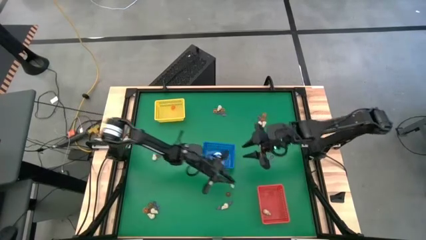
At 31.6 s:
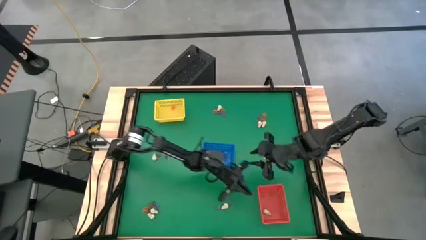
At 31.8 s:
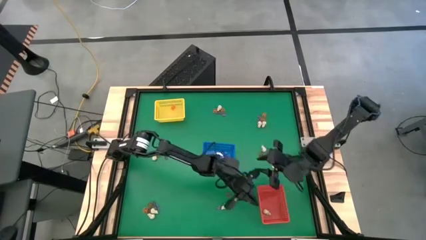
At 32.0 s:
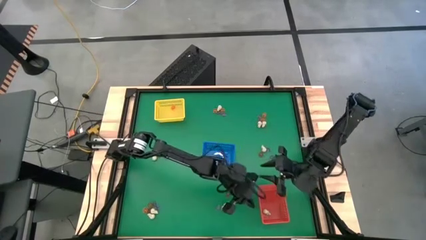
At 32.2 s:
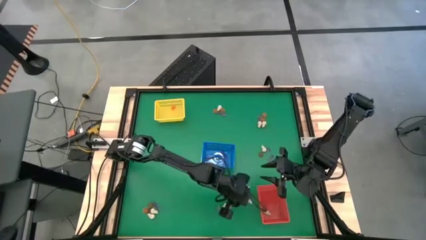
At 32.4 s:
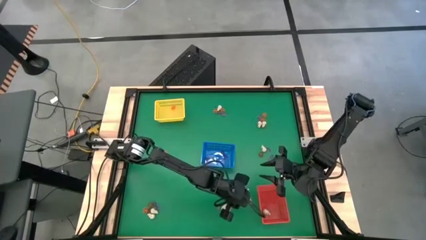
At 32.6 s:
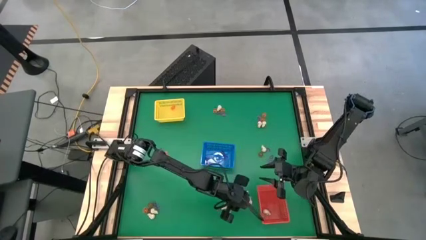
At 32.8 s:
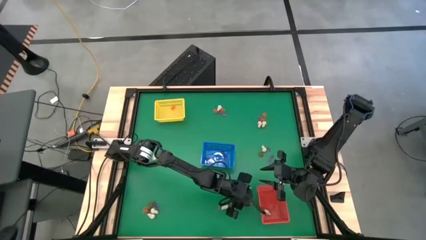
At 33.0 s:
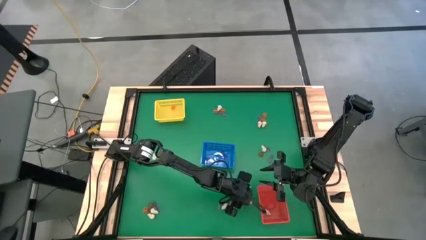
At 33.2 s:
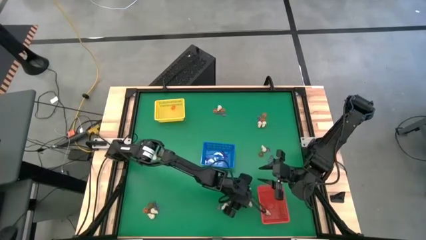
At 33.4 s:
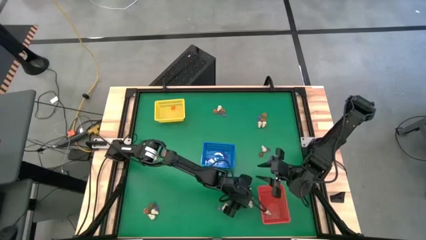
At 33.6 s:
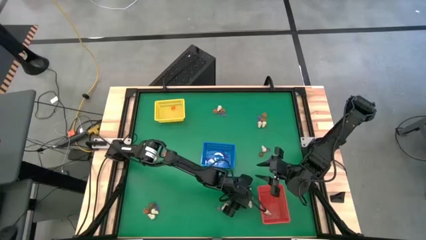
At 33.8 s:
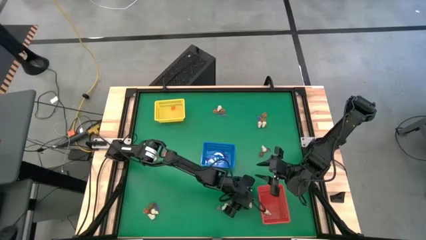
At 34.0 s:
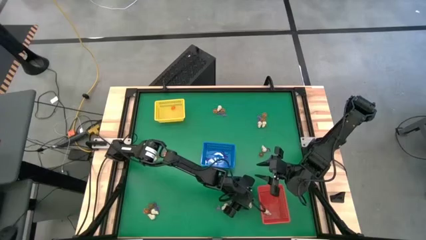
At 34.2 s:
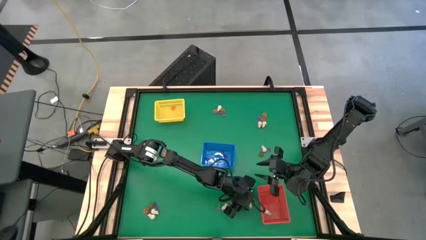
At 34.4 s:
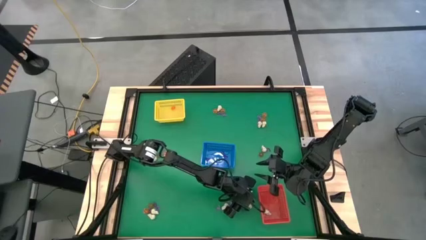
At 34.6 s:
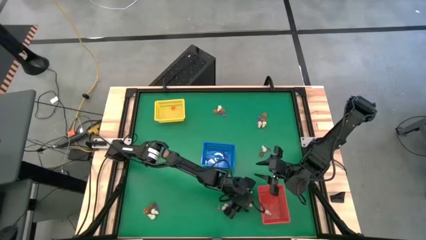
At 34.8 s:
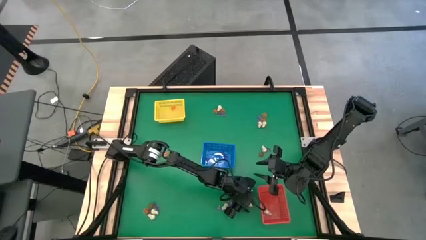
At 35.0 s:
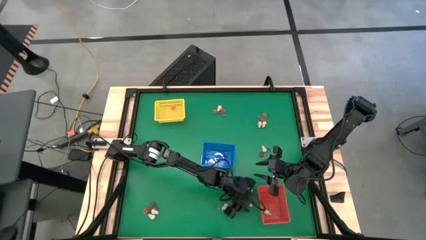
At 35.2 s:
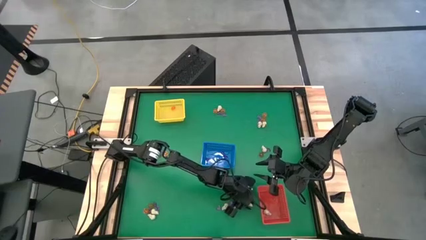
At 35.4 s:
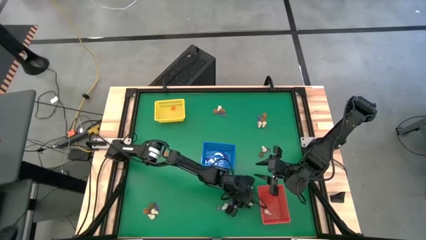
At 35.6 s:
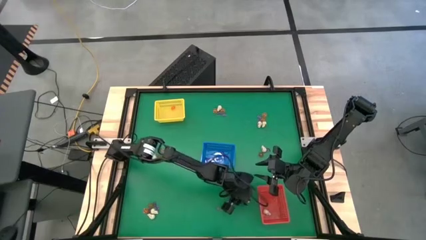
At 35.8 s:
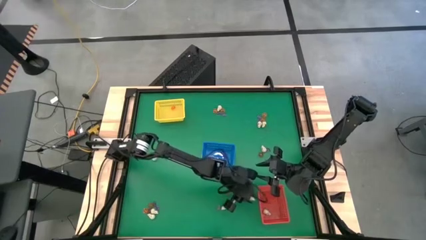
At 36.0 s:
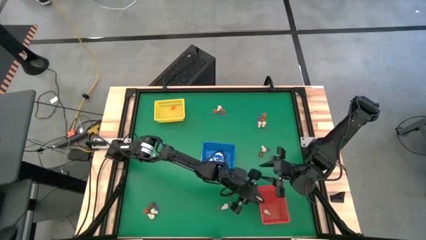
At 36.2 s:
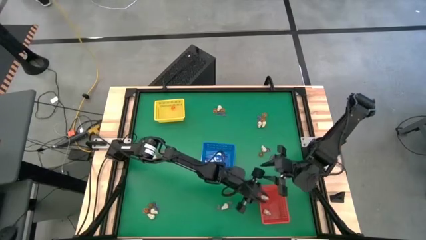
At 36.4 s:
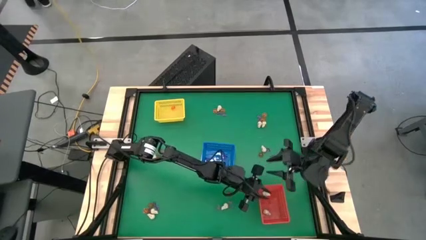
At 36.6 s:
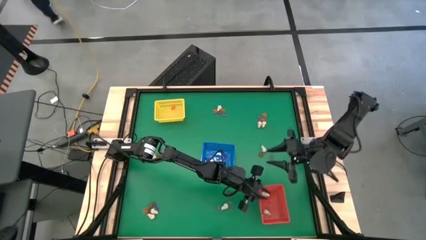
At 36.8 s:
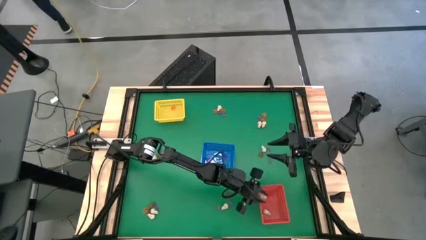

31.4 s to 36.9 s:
Task: Sort Halloween decoration
Put the skull toy into the red bin

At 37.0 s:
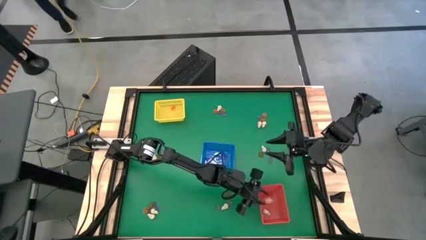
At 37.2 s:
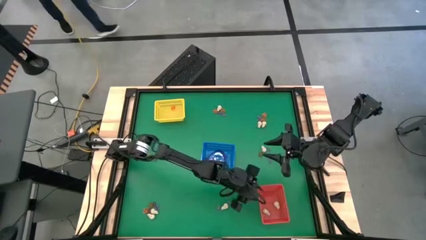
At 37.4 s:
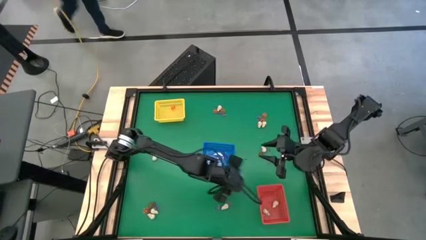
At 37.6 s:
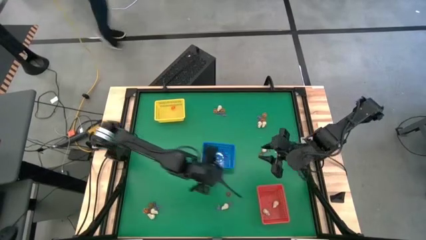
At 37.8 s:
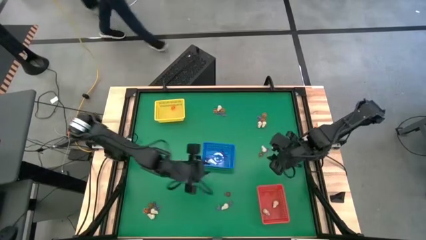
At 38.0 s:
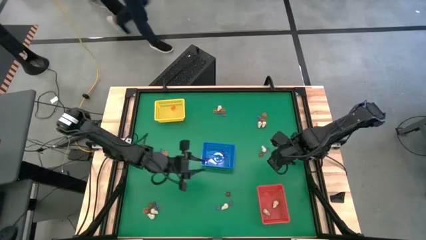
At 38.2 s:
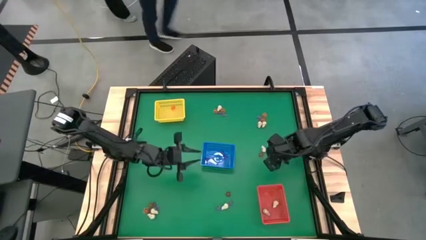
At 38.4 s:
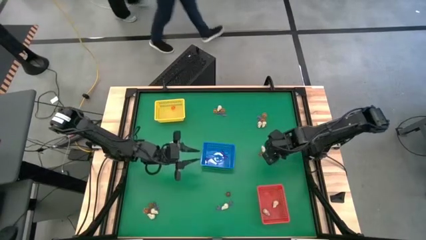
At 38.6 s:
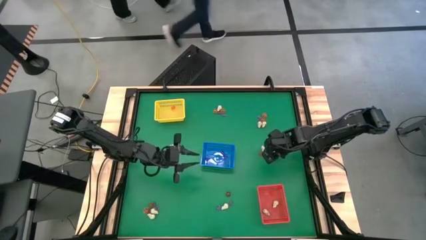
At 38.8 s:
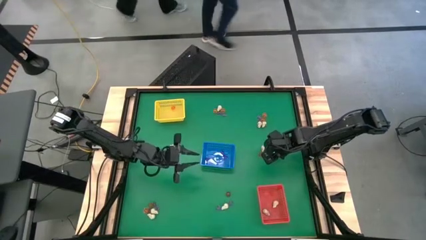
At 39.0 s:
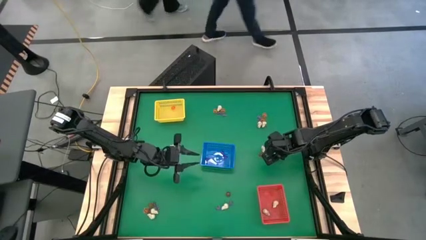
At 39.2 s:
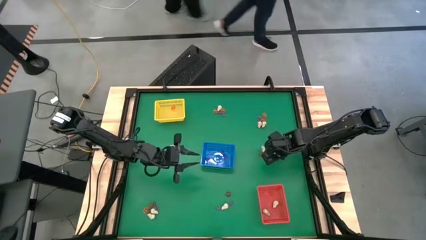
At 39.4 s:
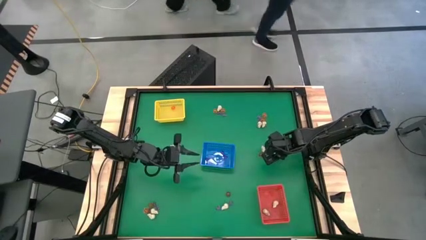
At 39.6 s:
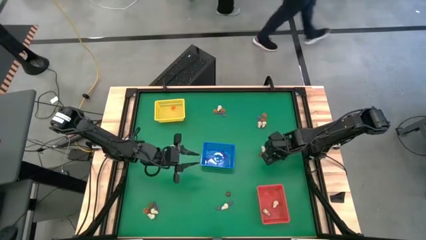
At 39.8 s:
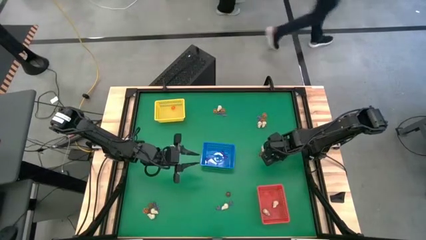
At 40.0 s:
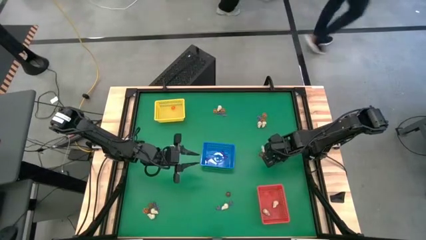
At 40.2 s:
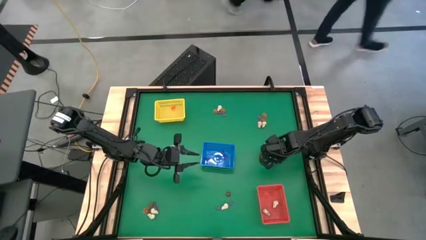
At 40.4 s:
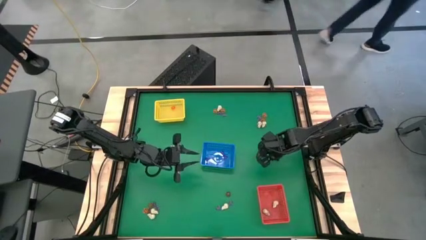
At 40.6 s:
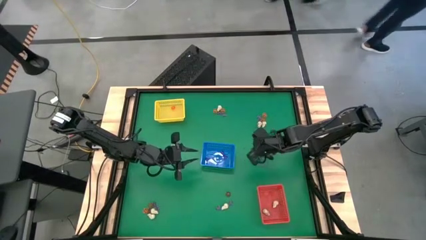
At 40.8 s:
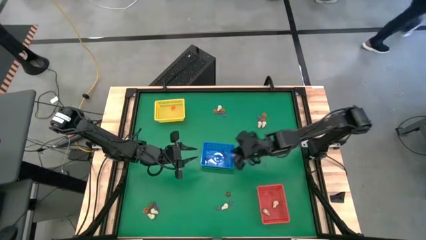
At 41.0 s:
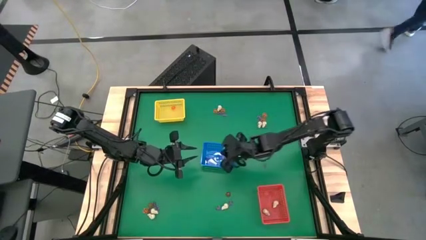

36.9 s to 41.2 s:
Put the witch hat toy into the blue bin

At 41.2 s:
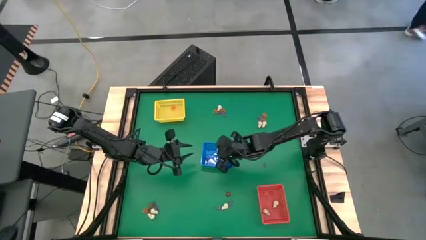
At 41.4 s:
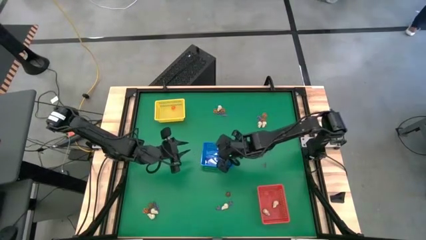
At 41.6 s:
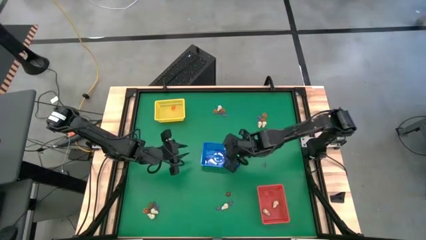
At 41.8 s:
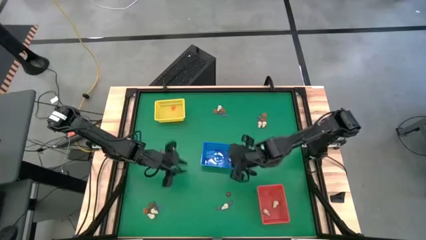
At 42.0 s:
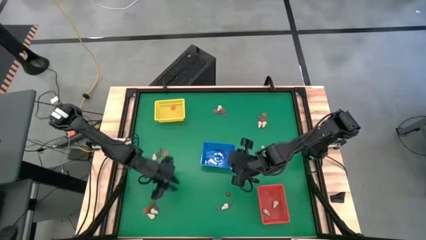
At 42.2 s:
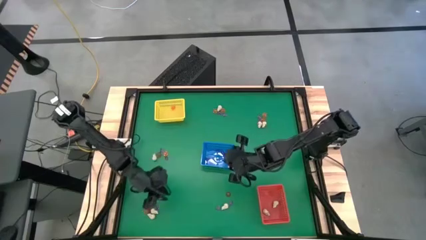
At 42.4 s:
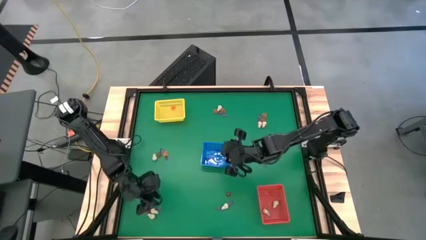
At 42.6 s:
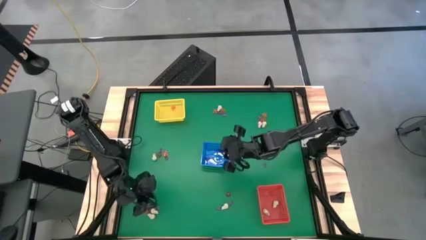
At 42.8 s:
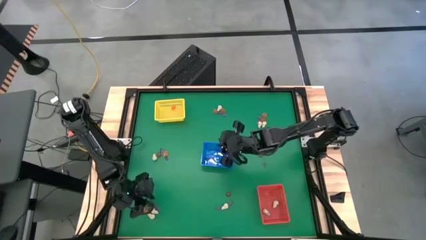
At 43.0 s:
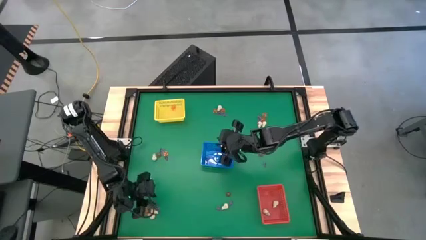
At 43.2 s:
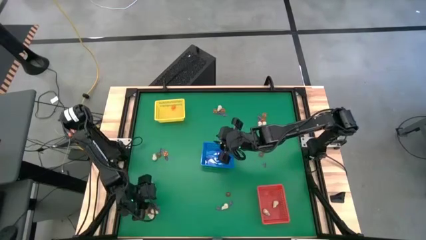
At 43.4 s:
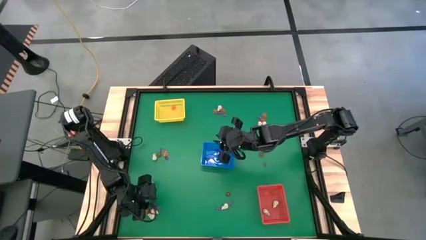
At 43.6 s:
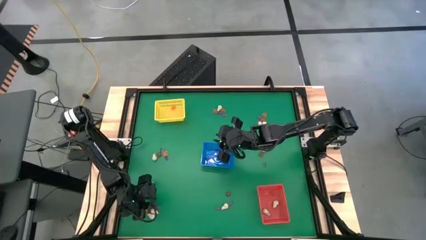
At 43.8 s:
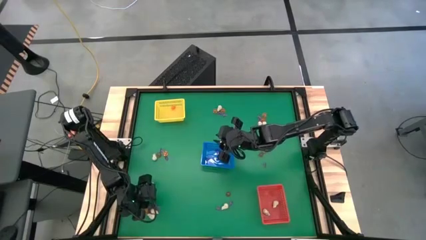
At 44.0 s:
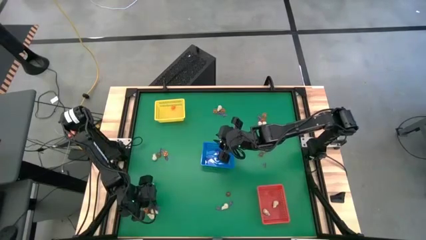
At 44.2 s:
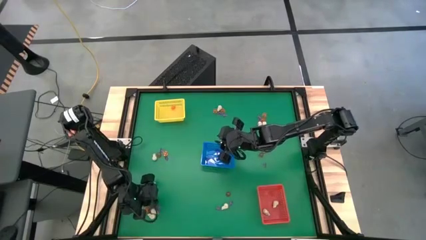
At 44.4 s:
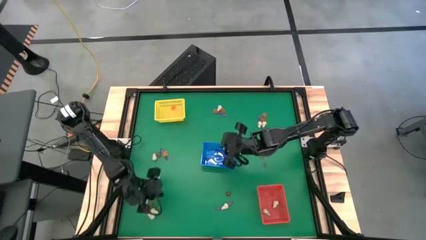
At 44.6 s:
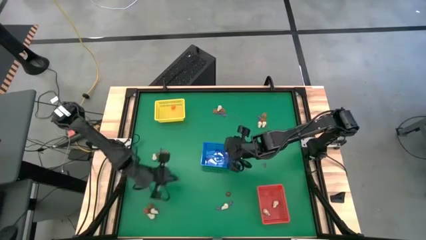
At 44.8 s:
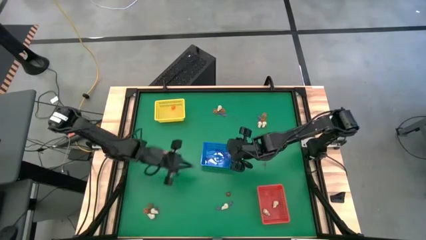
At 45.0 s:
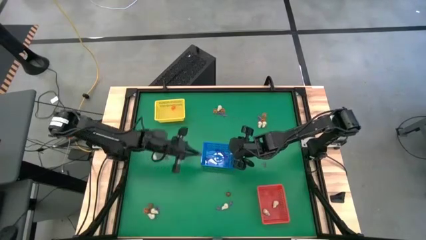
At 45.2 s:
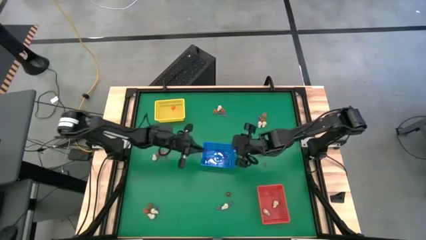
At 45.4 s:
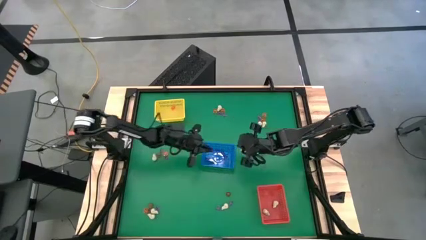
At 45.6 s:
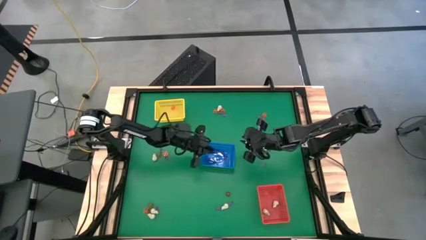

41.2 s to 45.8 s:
Put the witch hat toy into the blue bin

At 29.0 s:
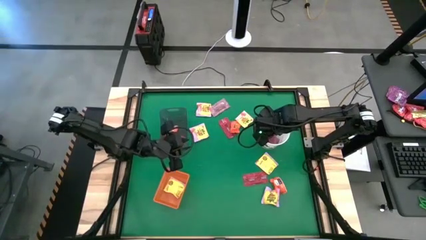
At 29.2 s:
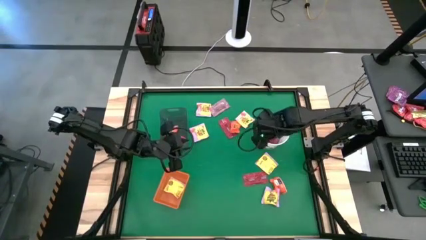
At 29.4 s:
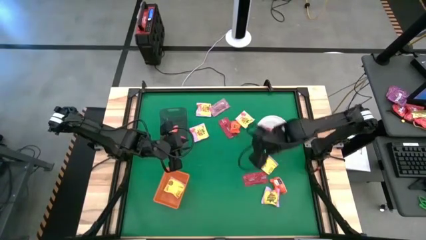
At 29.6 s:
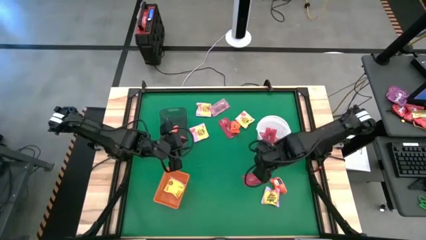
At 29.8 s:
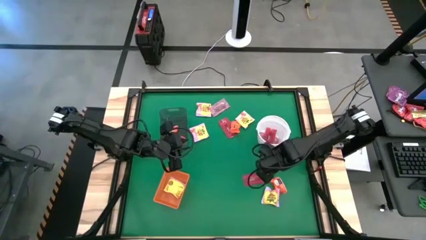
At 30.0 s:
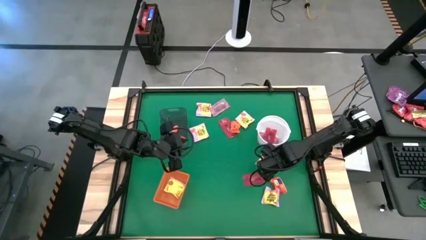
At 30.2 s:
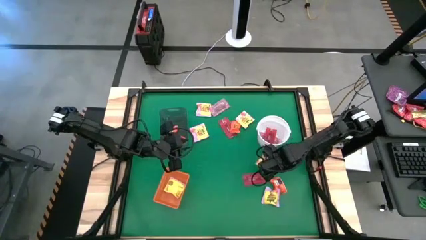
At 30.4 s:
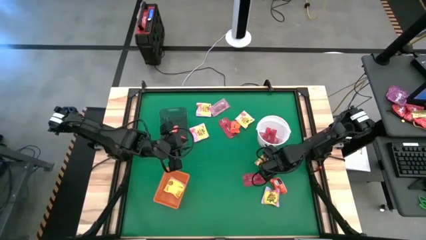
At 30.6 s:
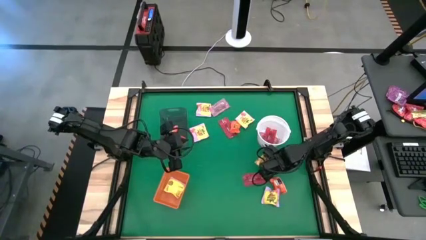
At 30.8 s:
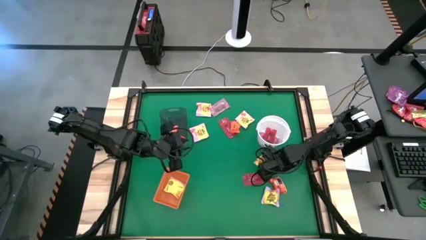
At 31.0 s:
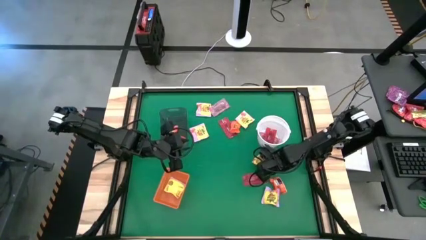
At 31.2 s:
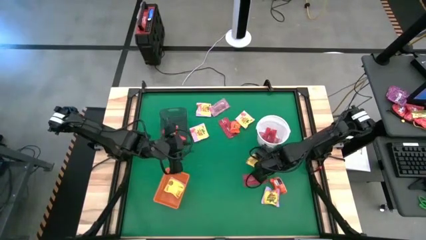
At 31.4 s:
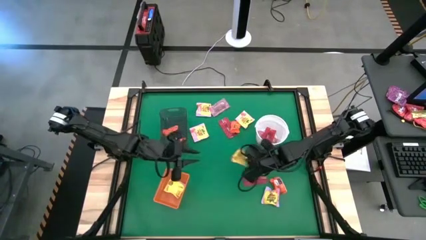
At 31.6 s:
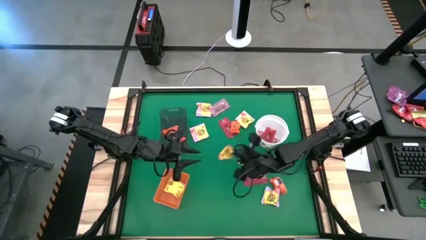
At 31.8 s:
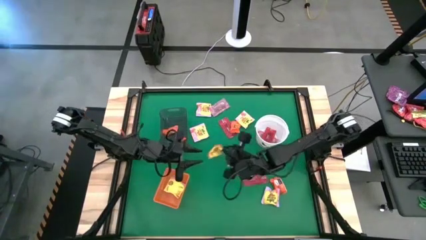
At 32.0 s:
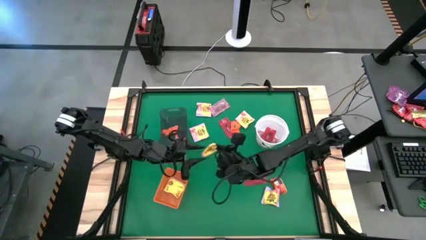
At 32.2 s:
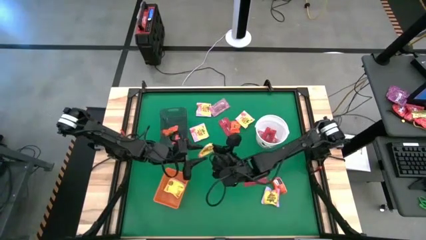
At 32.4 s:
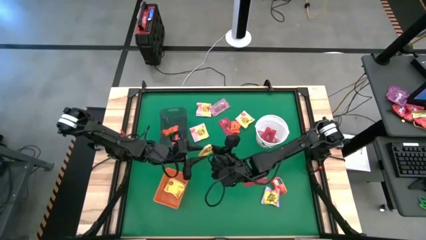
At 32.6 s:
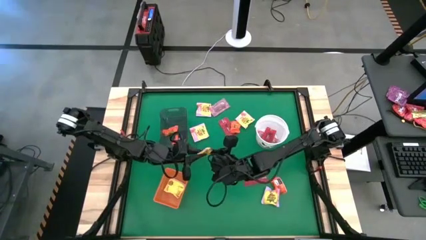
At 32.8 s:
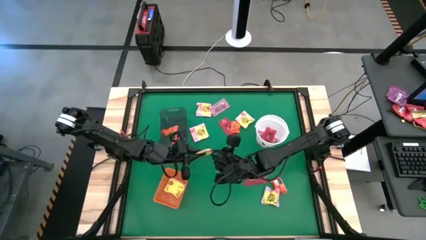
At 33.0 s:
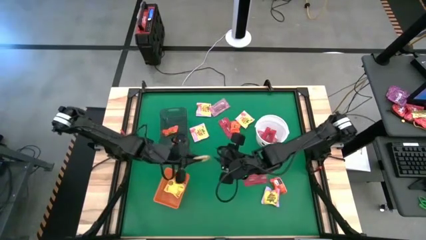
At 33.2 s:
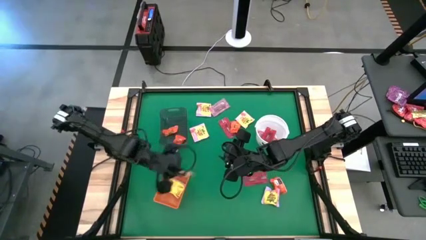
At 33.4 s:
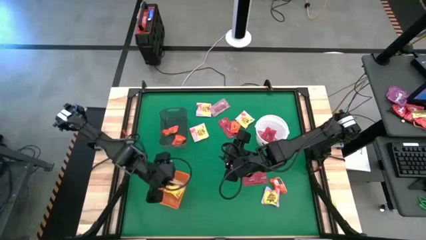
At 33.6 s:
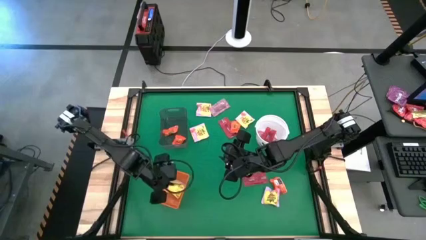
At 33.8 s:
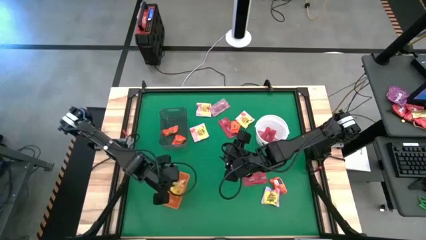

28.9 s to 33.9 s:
Task: Sort candy by brand, put in halloween buckets
Put the yellow candy into the orange bin
